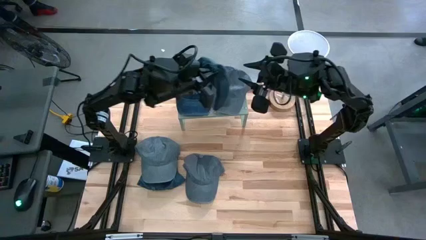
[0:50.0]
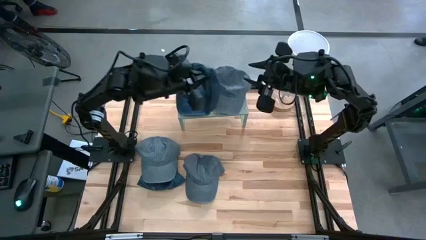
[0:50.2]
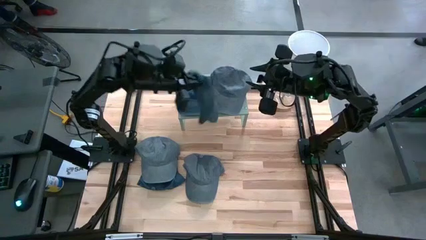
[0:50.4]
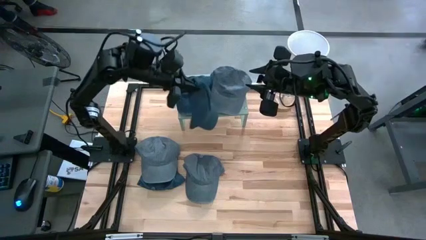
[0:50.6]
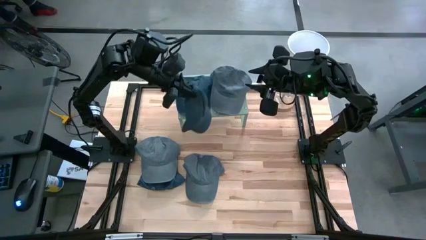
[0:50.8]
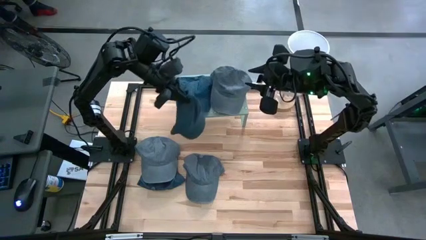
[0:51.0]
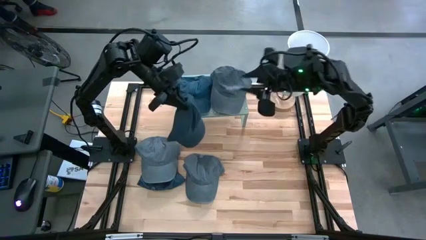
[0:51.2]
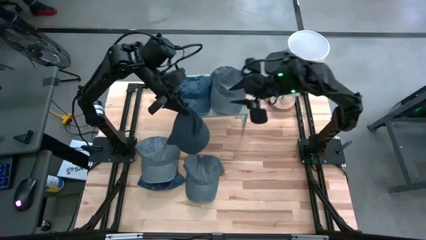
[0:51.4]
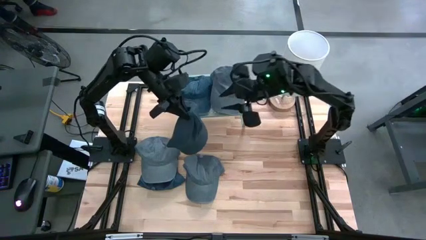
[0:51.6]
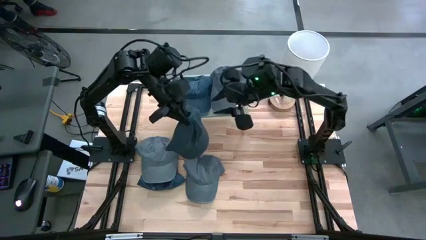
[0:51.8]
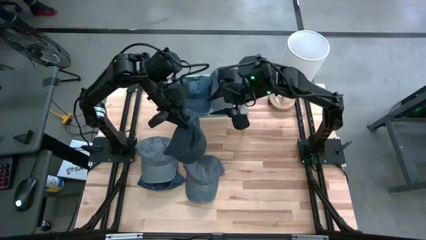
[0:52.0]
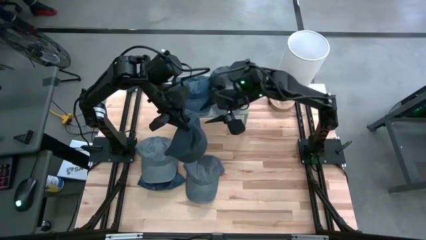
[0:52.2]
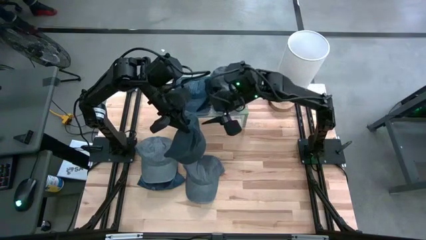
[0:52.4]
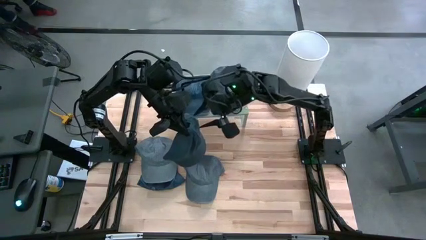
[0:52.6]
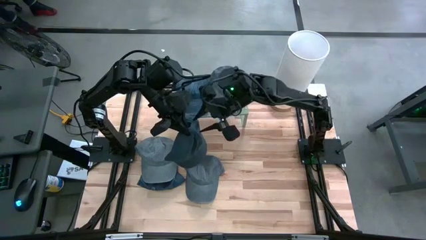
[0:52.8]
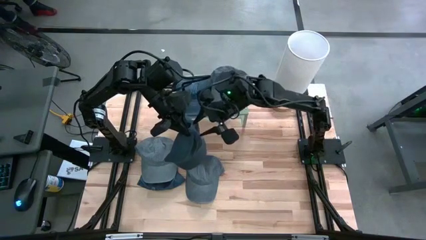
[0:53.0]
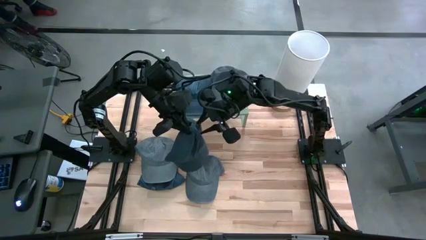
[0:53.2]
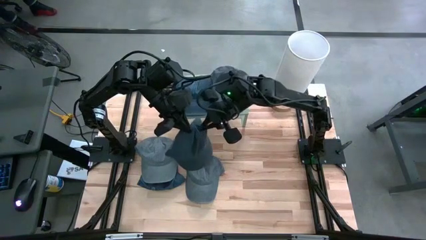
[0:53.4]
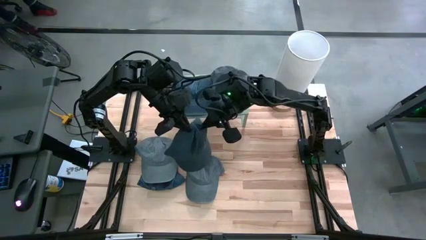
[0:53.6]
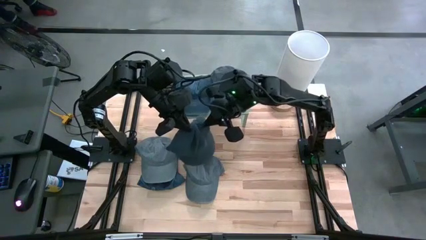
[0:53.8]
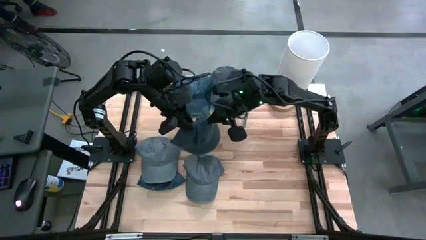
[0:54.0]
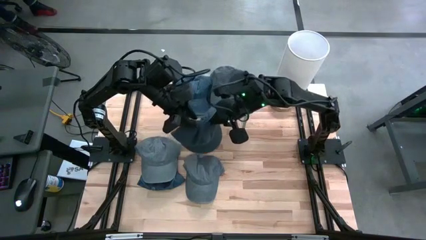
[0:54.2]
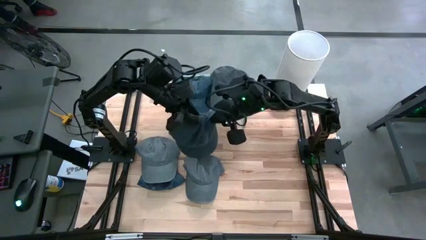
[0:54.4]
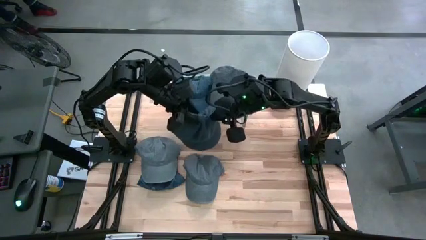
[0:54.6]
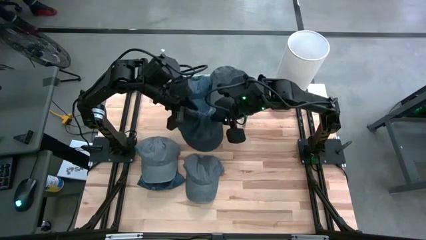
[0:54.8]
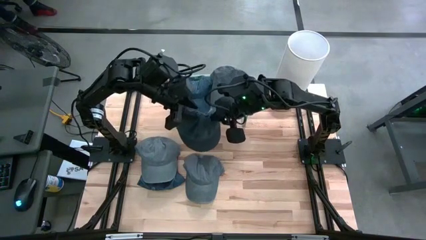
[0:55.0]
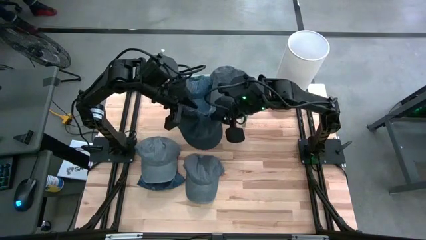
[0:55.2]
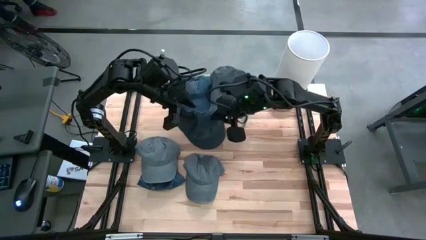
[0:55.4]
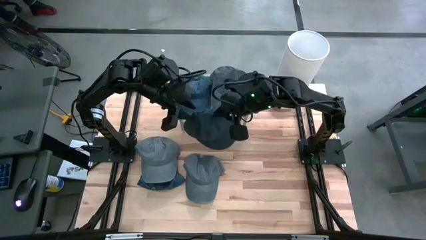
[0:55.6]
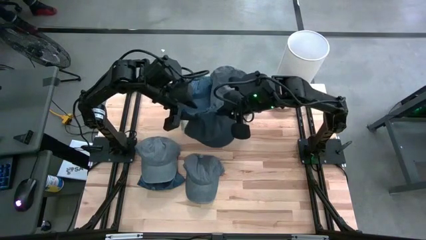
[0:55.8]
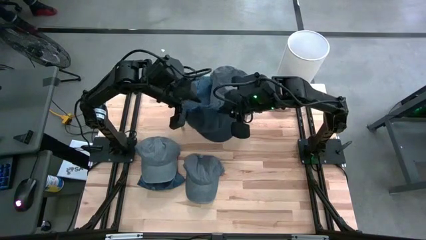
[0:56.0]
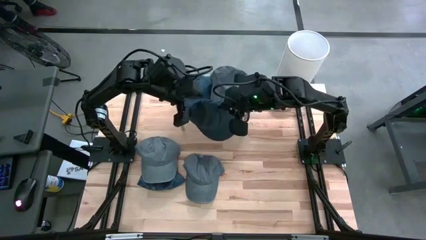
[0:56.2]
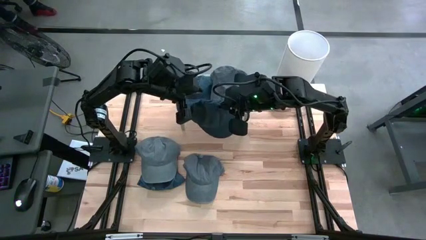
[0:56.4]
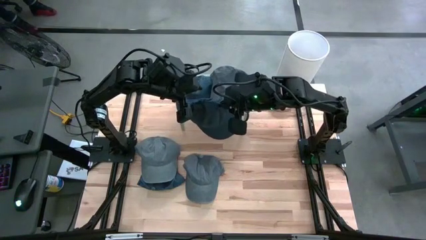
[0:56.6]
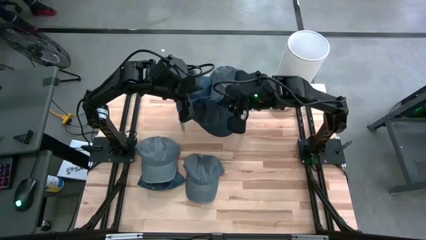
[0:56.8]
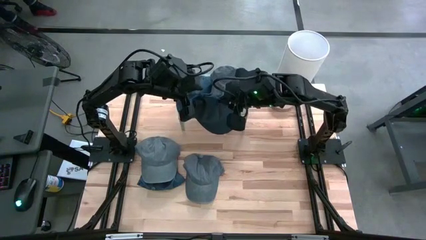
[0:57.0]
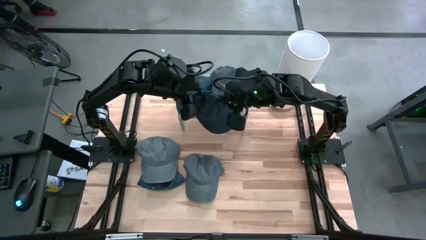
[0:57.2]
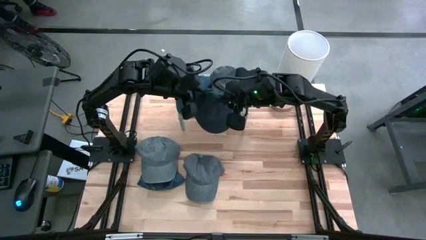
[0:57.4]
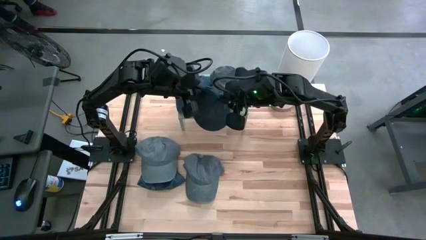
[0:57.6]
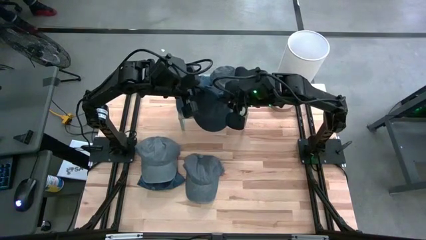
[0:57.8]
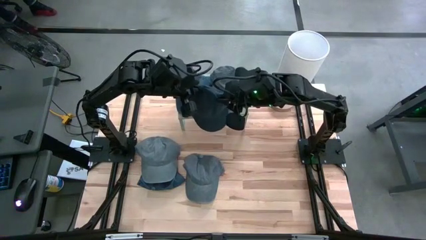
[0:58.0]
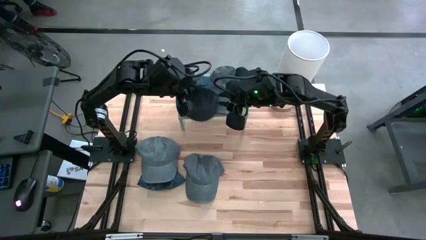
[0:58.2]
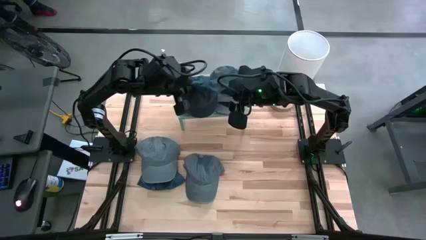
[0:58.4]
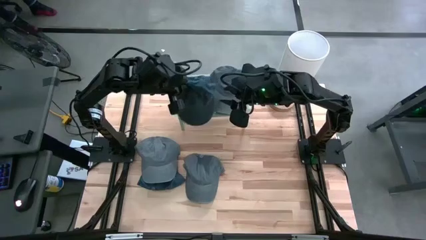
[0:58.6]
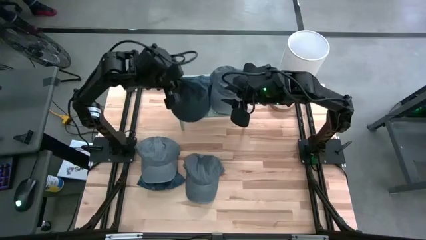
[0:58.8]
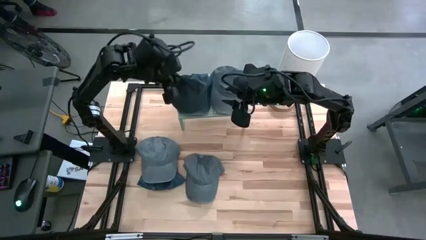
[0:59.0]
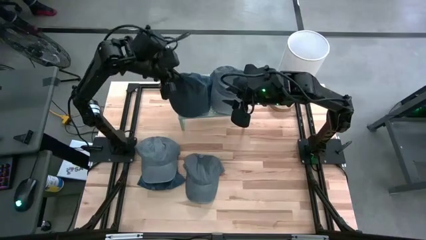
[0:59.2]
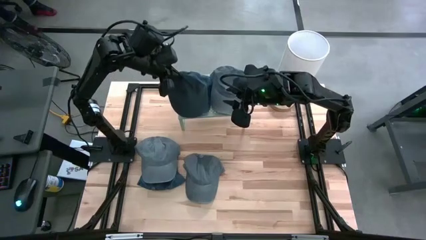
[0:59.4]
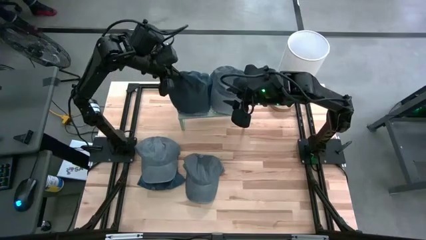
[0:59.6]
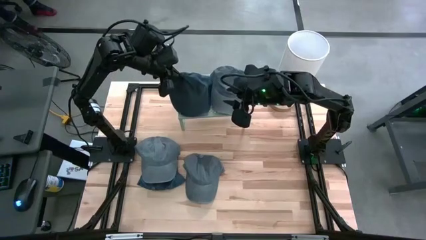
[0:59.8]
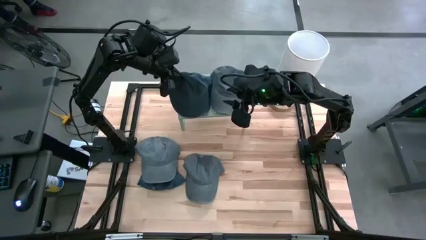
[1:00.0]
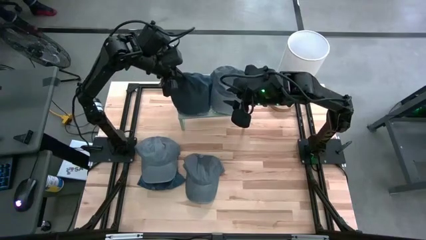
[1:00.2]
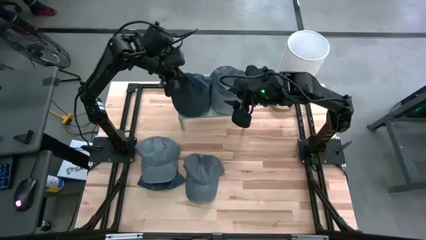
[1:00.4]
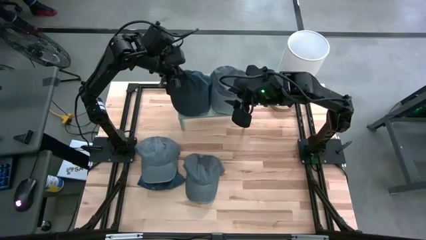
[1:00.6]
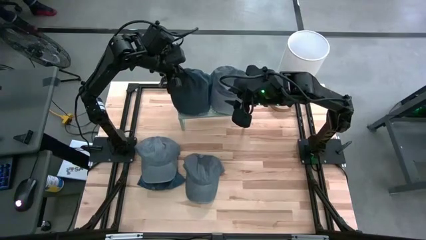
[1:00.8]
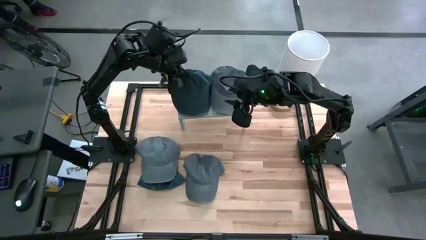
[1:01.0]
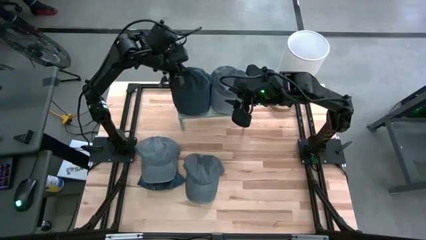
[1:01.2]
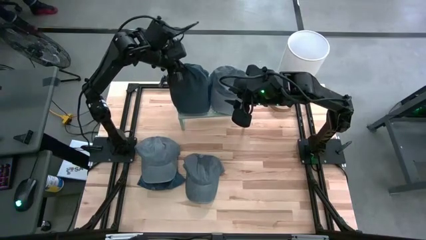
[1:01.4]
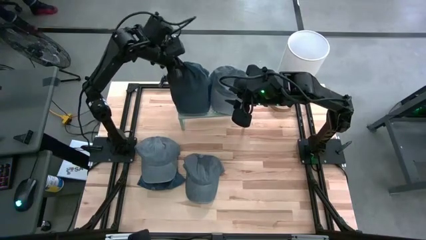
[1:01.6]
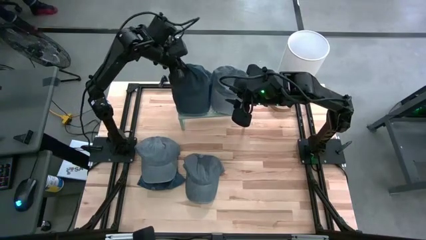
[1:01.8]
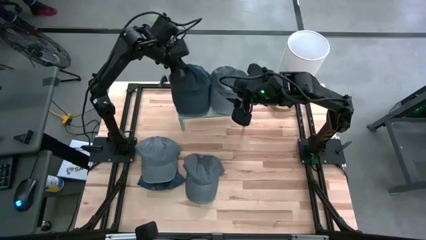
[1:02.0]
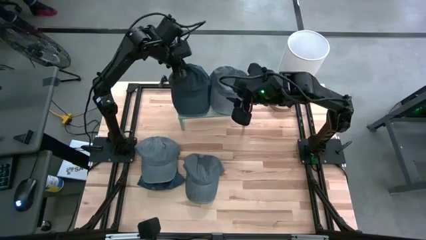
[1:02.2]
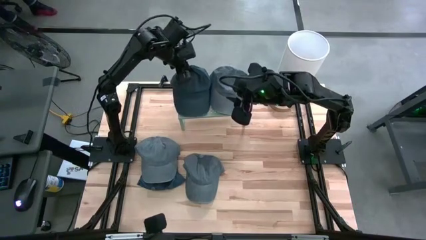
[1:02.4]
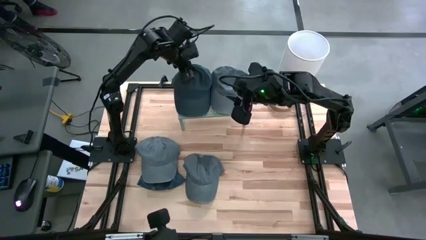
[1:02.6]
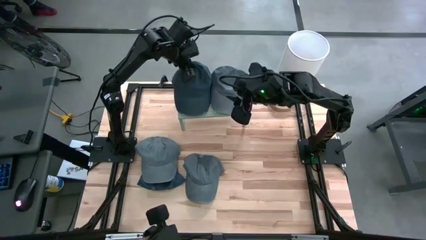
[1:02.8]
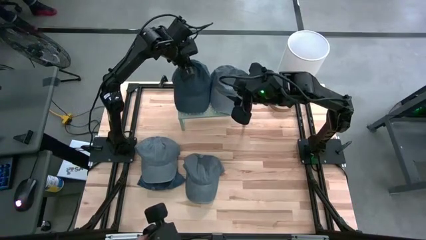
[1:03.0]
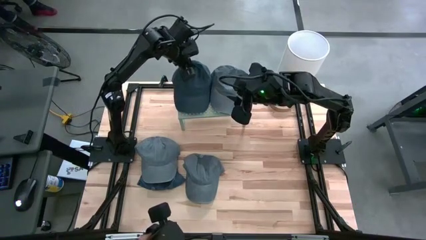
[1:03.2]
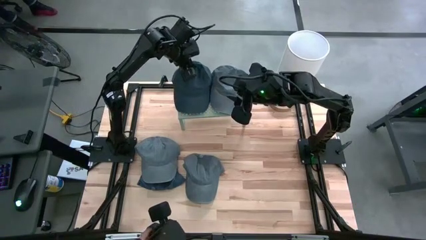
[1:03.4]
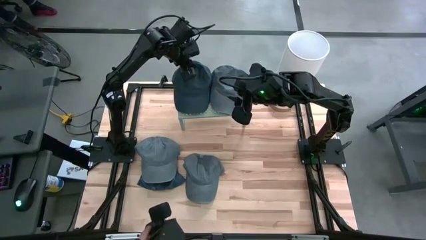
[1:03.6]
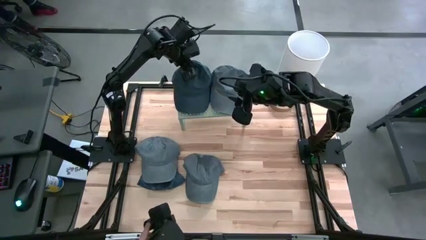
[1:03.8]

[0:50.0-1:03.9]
Task: Pick & Place hat
Stack the right blue cap on the blue cap on the shelf

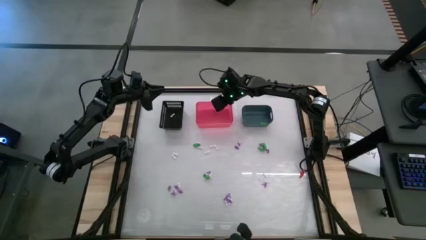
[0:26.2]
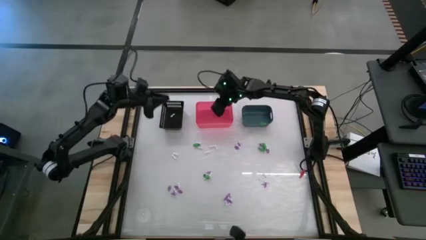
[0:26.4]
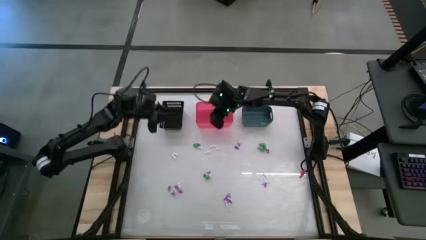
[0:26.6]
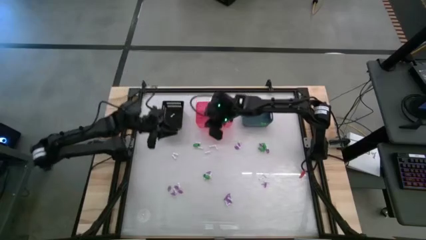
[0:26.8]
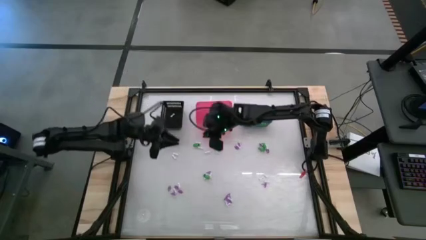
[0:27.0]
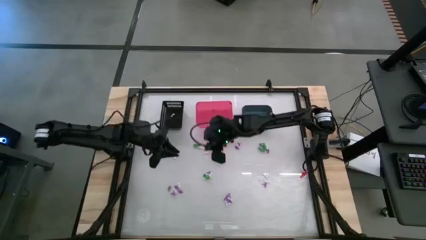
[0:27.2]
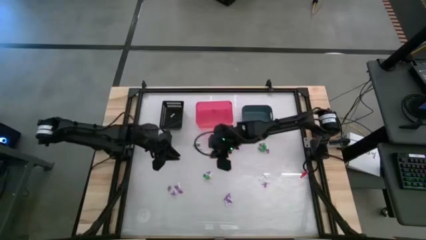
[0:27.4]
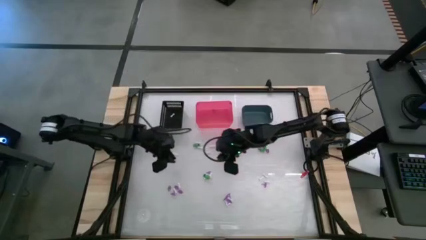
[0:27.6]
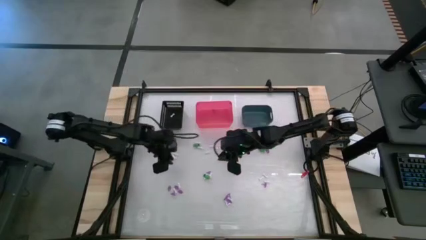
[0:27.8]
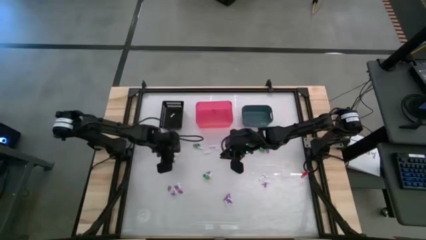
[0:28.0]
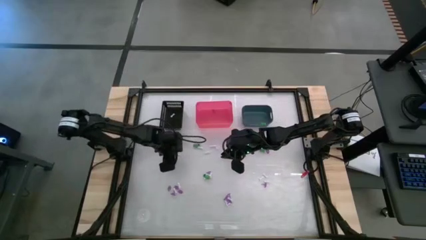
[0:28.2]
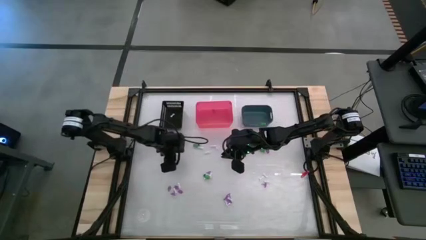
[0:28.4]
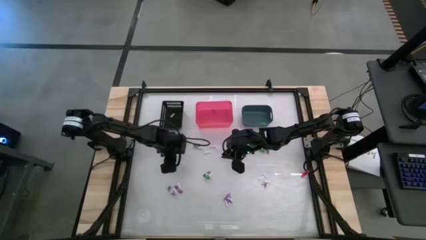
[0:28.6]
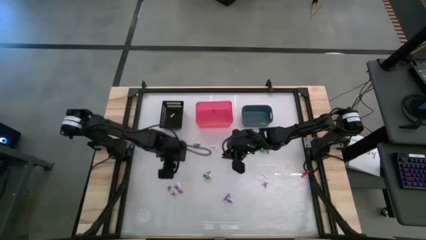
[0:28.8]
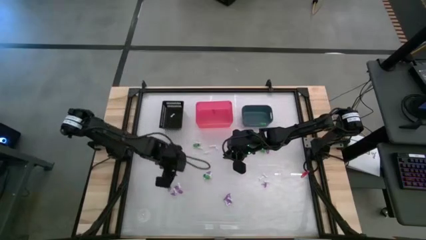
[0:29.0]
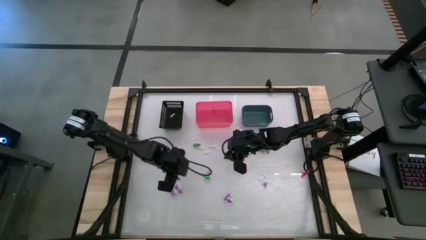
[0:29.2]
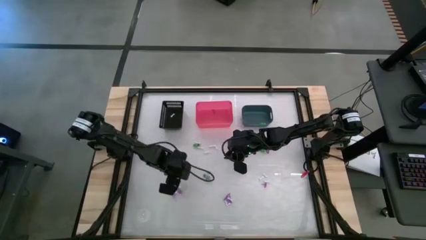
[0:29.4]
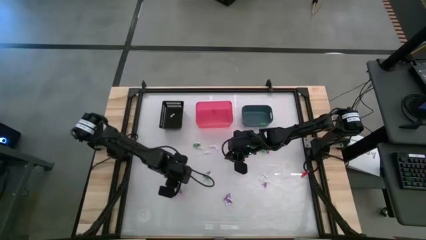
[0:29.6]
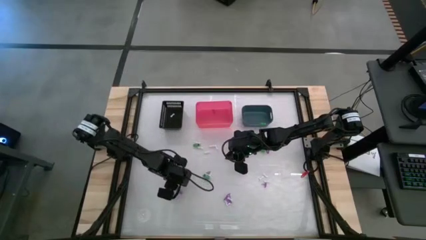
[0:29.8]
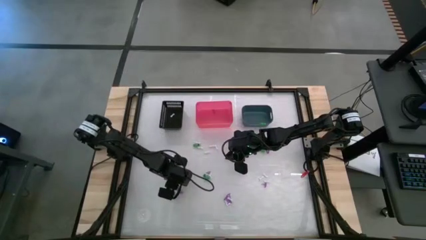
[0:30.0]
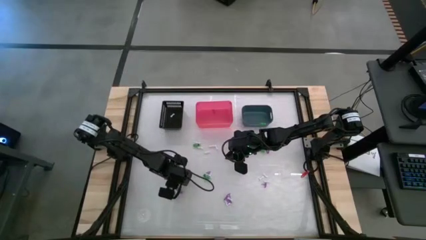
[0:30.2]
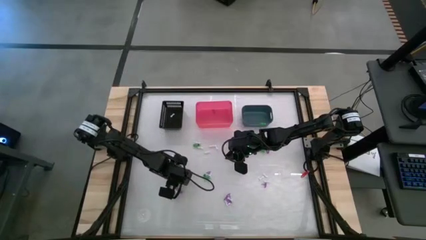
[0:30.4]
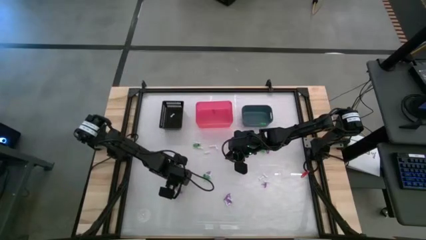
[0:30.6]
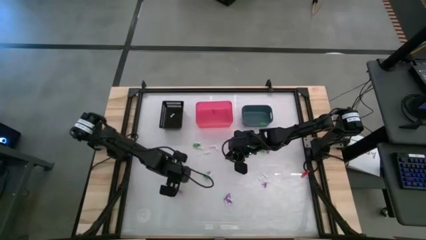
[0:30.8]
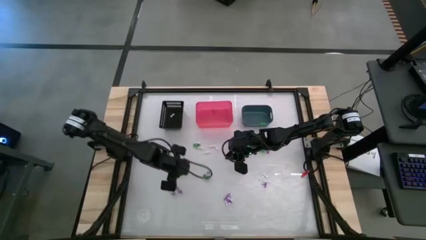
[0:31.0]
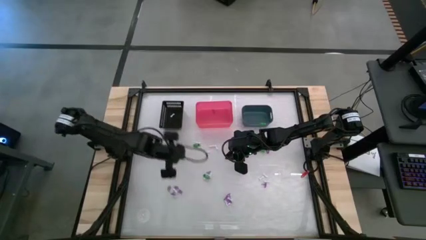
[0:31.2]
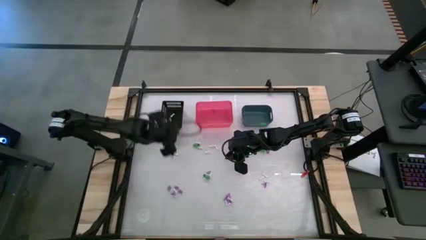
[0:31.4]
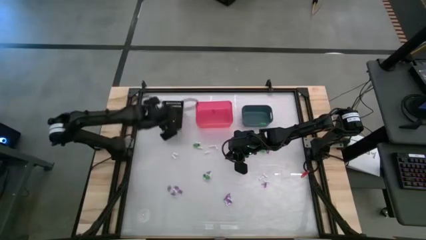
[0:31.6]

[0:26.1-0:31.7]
Task: Sort Halloween decoration
Put the white bone toy into the black bin
